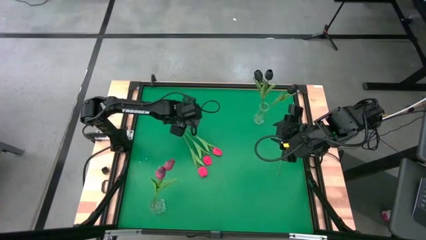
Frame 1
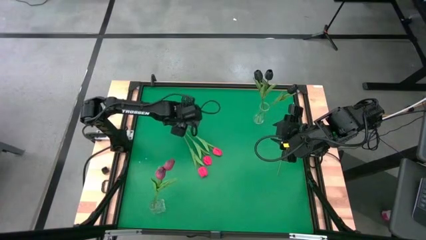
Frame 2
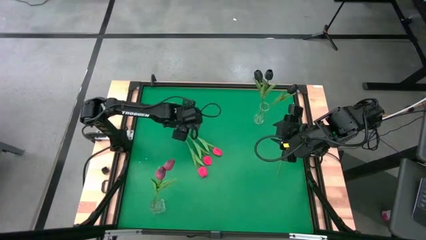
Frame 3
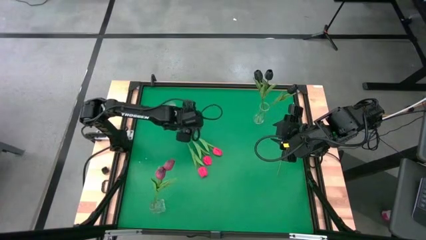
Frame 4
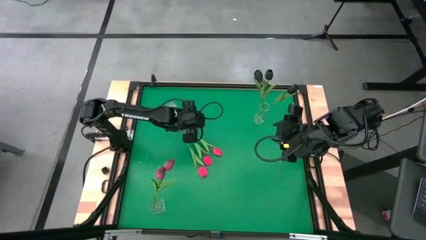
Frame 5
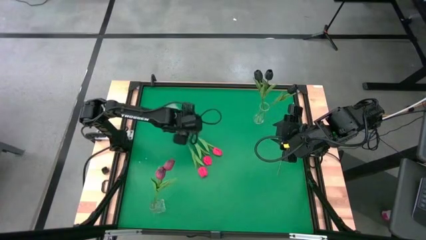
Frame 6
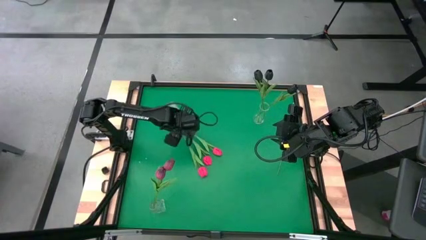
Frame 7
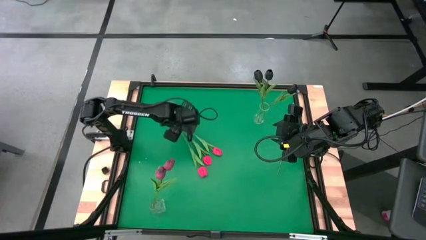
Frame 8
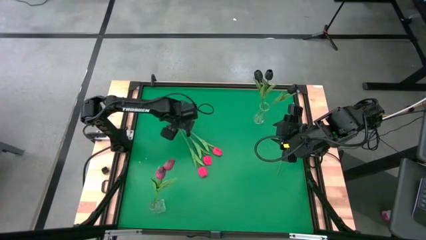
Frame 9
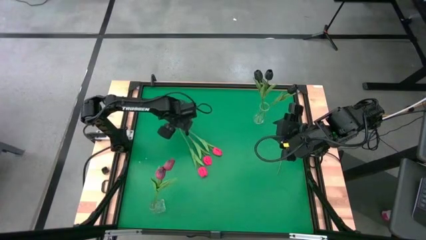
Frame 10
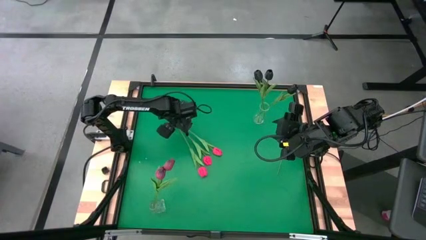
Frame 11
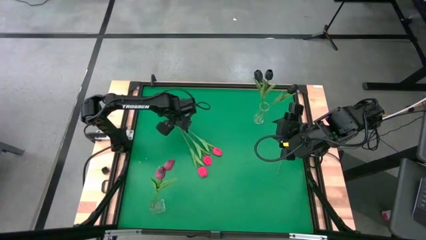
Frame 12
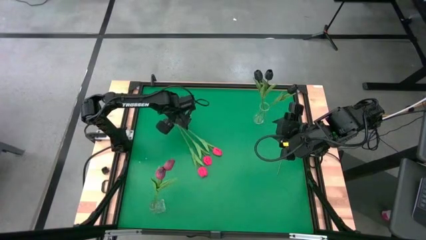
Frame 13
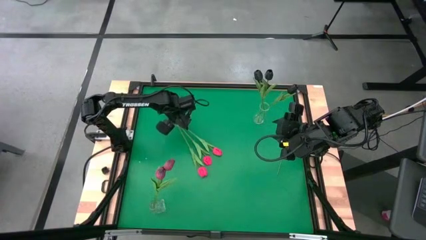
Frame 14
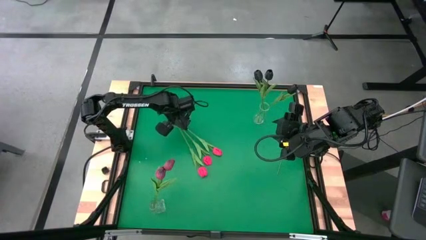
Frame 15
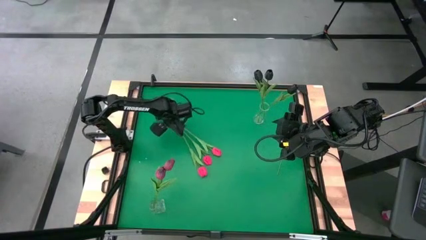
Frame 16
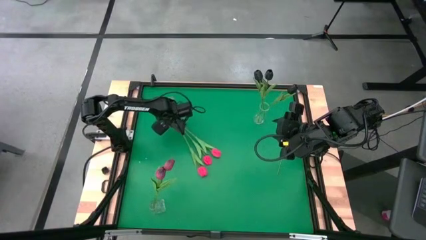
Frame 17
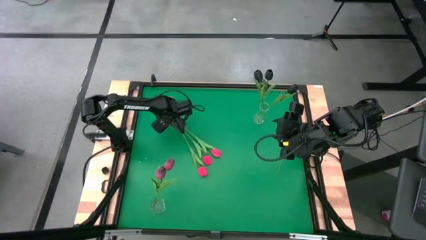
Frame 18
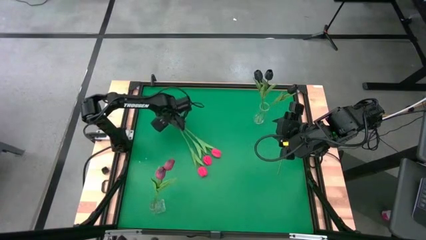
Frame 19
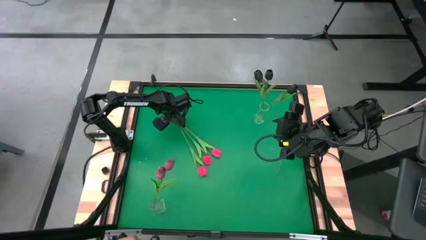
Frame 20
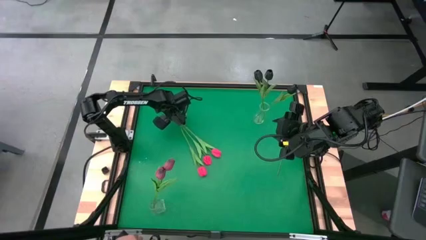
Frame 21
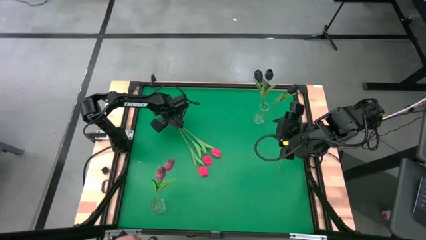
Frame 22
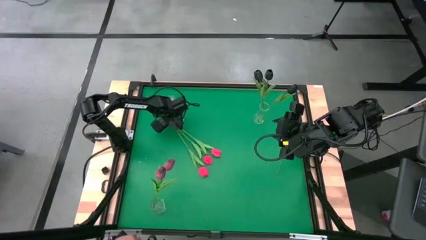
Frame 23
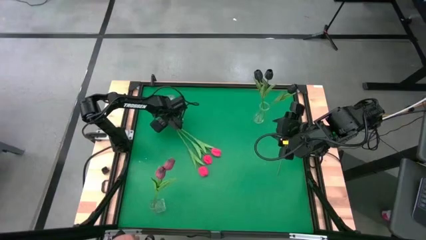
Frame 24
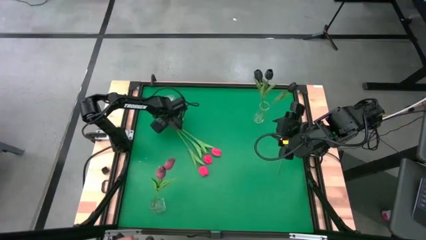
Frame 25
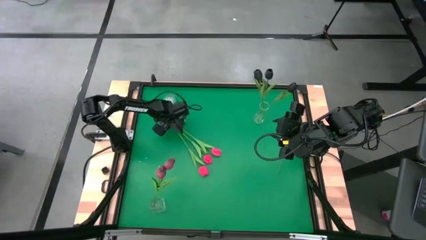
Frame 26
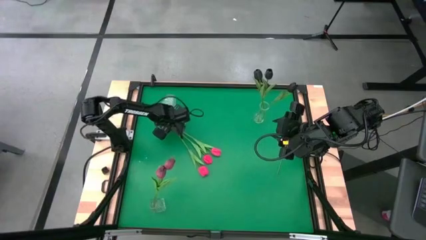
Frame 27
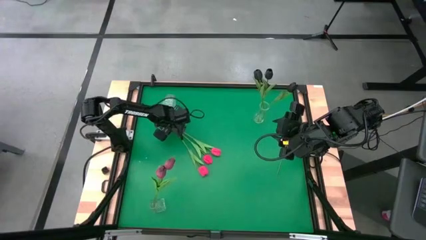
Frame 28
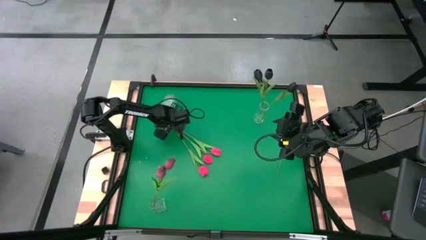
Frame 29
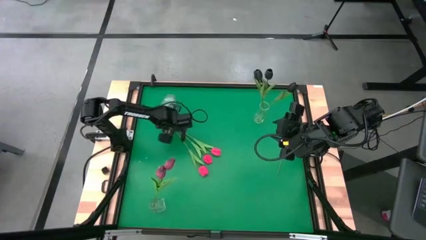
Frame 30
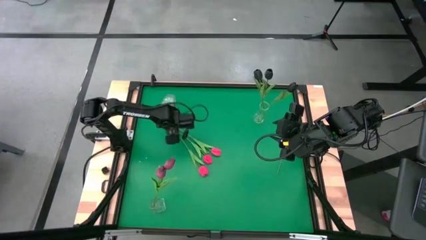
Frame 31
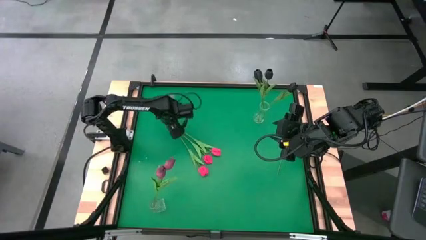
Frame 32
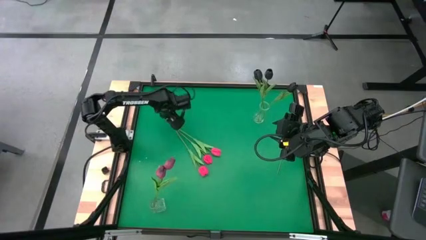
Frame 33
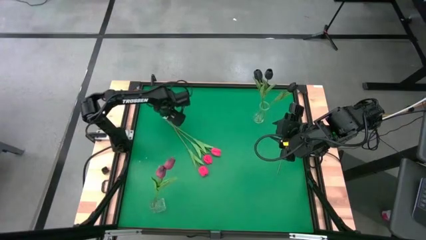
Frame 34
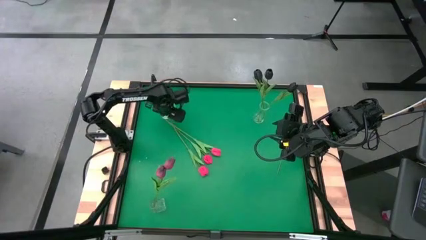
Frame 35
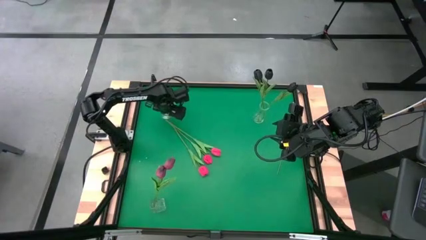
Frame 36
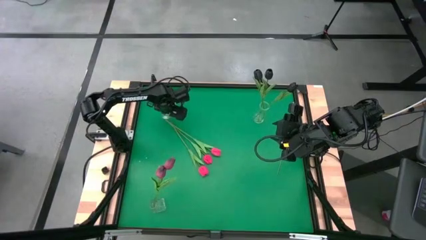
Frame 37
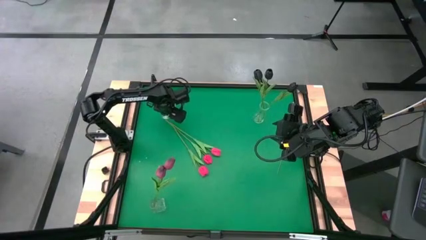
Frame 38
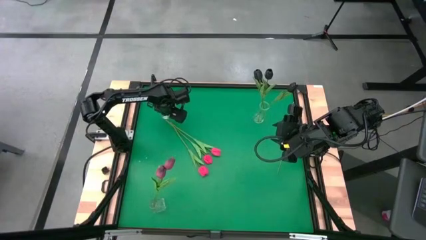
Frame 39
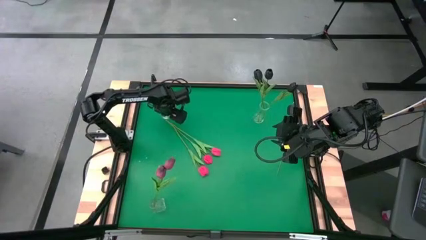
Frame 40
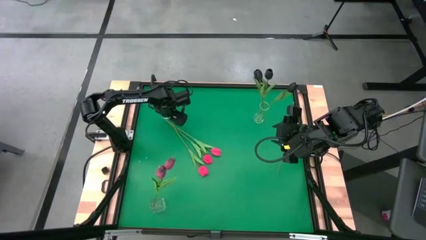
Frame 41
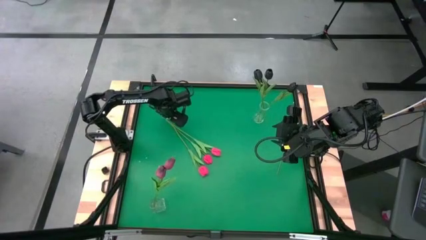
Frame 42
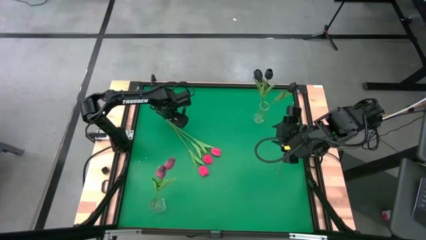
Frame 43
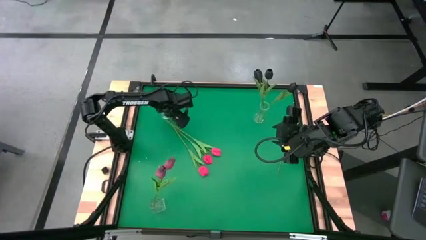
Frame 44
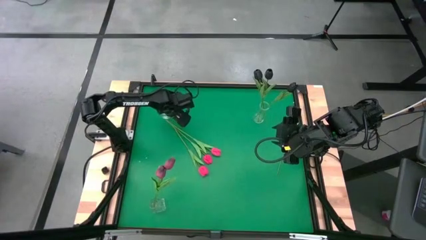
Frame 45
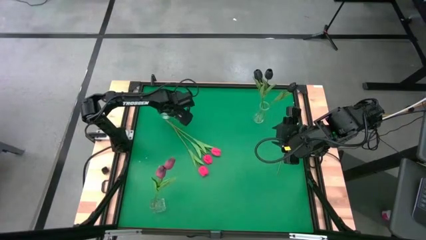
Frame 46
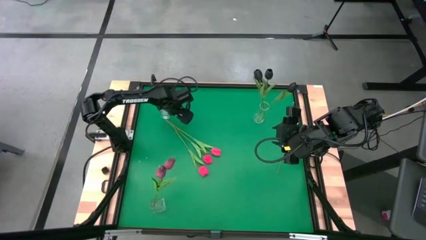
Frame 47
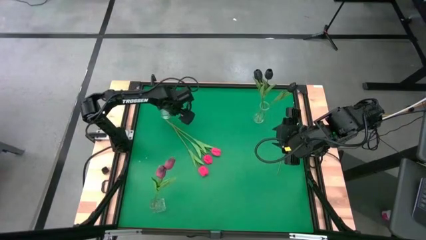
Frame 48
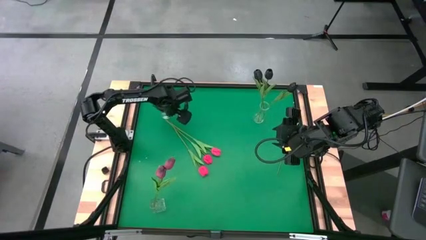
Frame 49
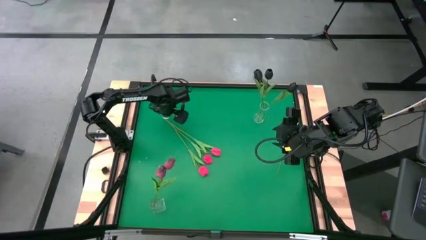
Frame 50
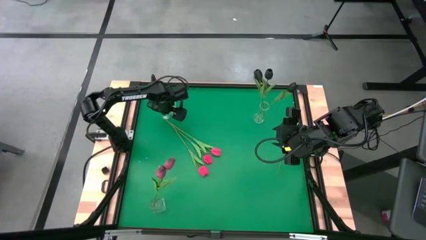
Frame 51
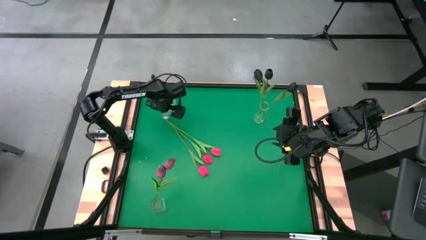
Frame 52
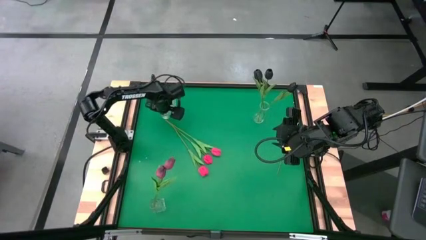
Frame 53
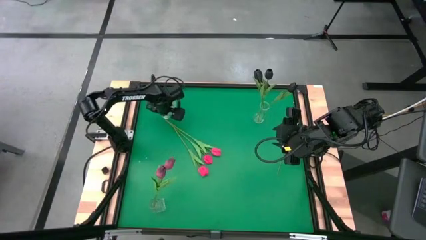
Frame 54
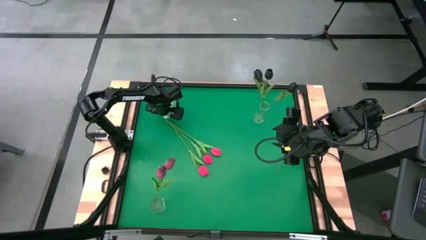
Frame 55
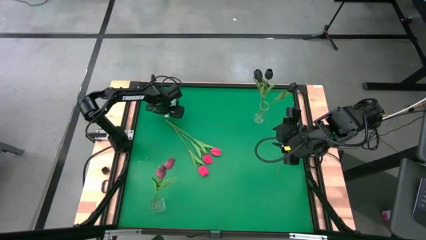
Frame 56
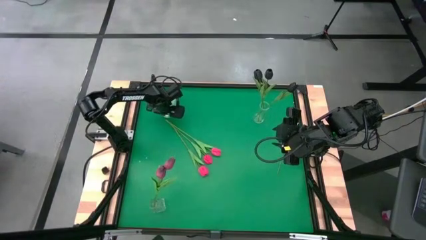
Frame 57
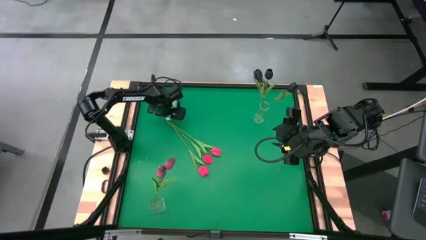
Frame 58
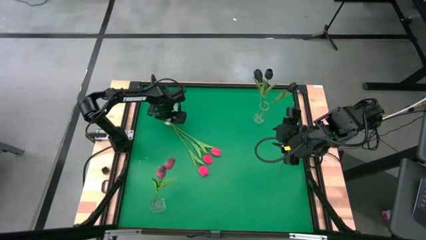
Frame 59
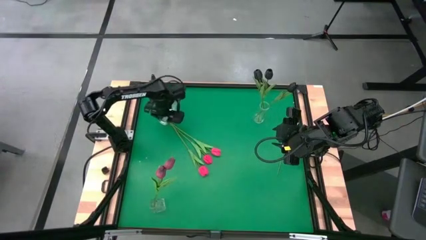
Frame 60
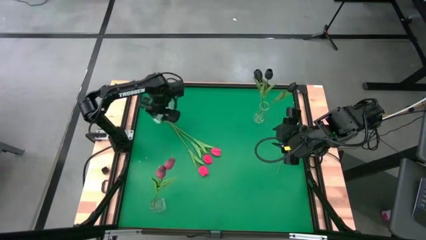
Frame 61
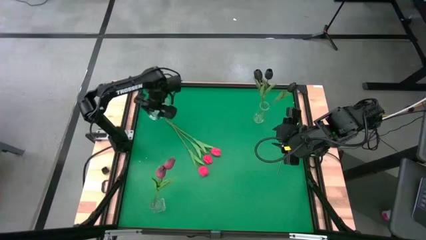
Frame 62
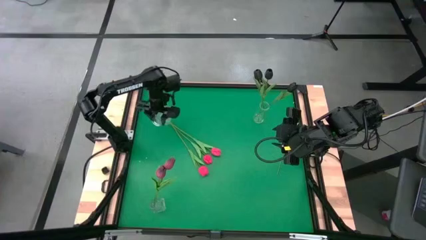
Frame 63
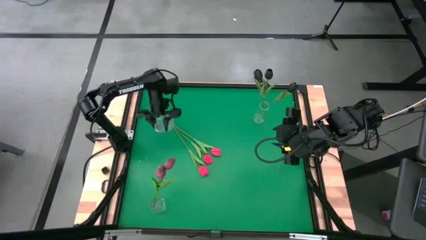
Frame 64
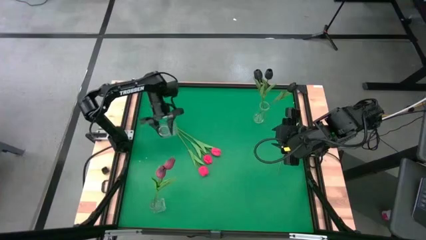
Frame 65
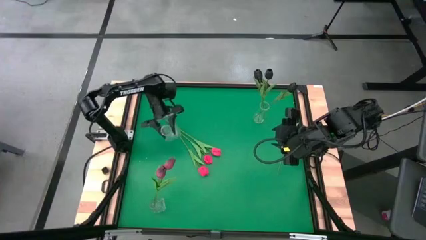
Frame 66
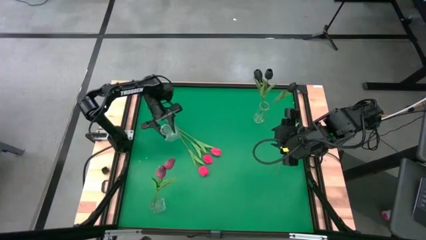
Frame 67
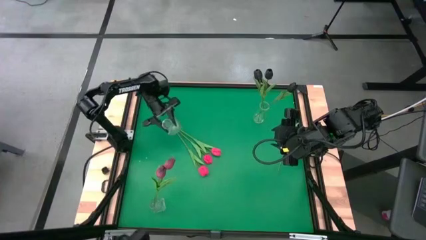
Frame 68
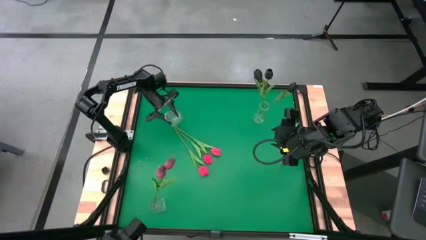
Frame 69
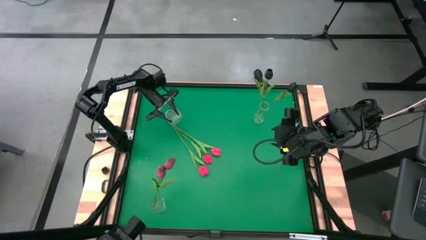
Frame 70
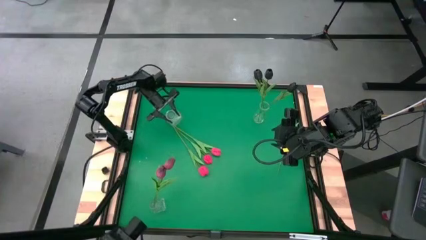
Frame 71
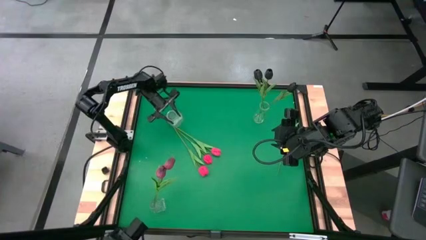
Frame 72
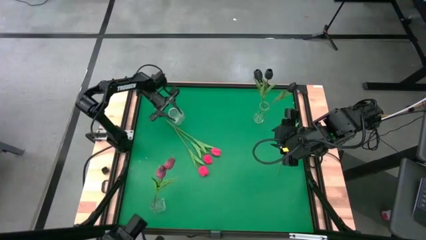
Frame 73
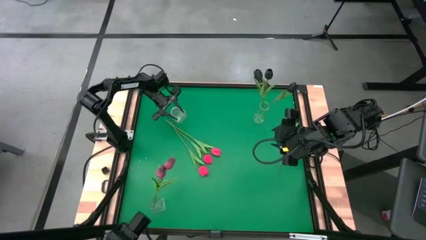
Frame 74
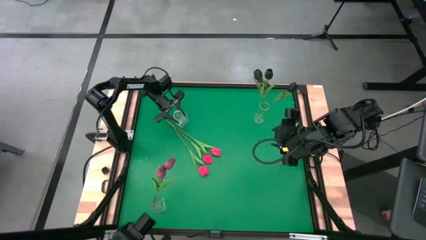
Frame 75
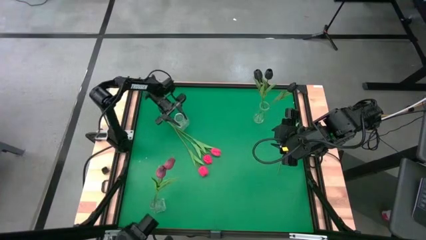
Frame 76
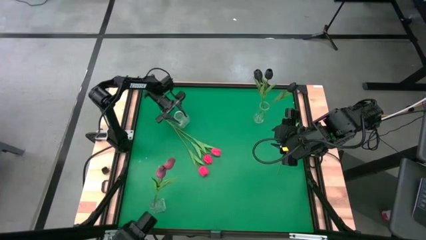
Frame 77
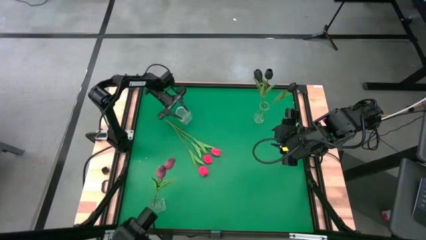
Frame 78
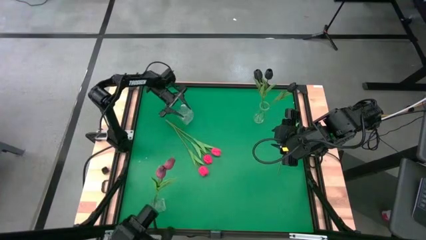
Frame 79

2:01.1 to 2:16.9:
Task: Sort flowers into vase by color
Put the pink flower into the top left transparent vase
